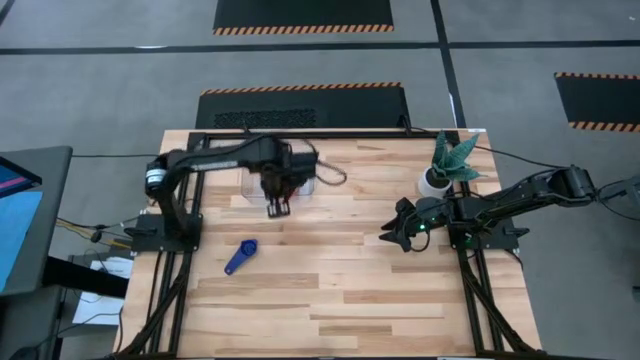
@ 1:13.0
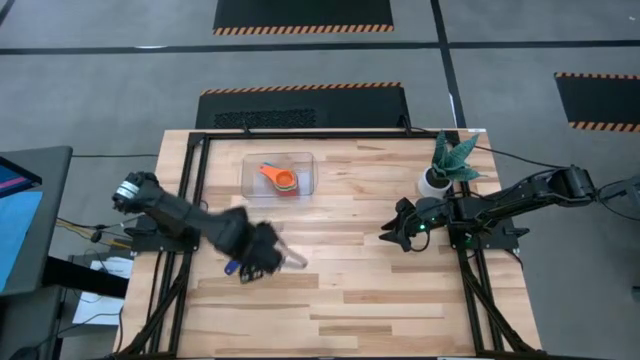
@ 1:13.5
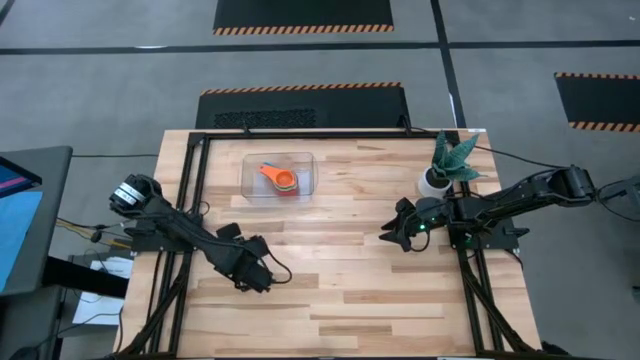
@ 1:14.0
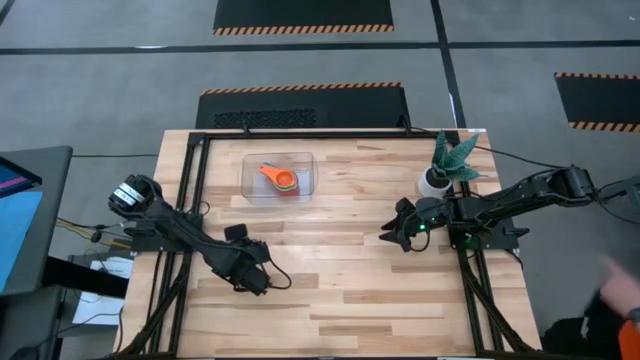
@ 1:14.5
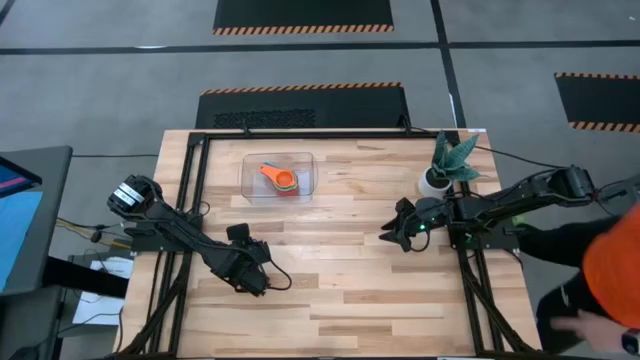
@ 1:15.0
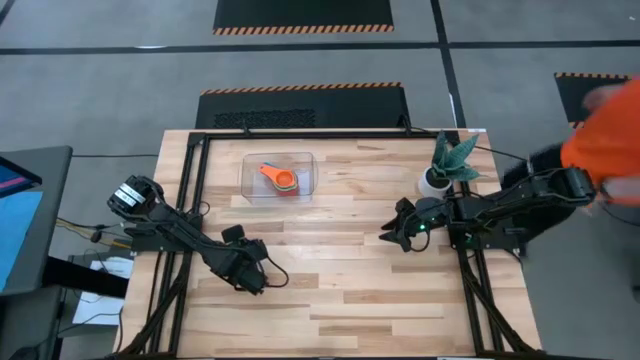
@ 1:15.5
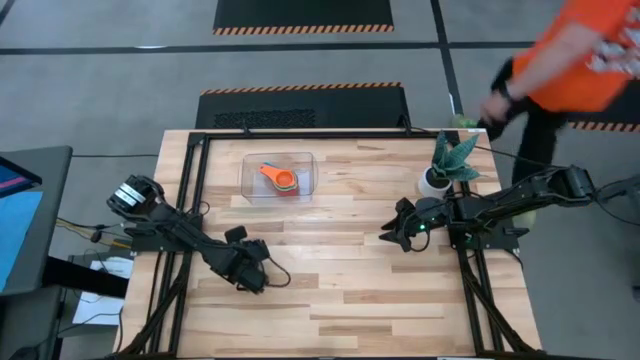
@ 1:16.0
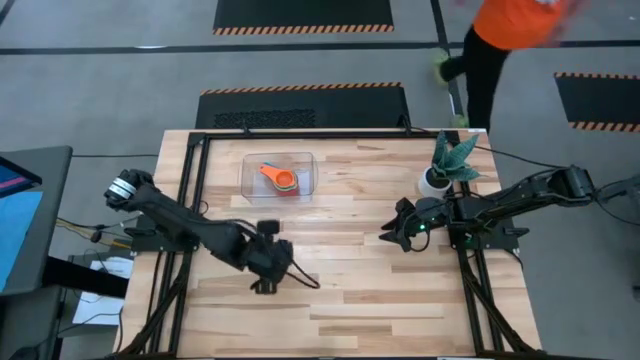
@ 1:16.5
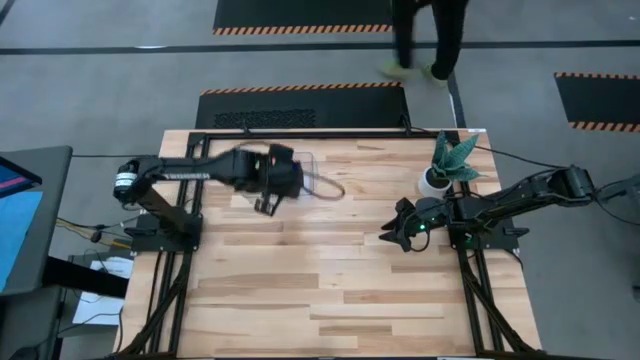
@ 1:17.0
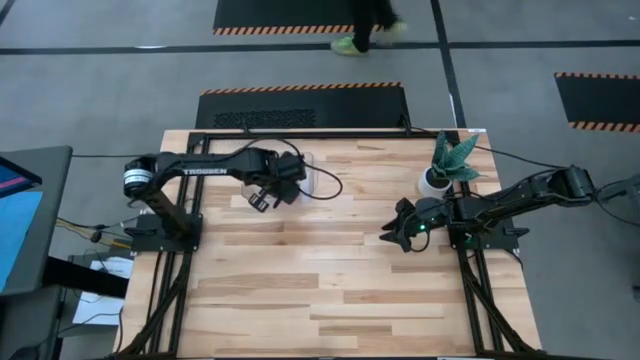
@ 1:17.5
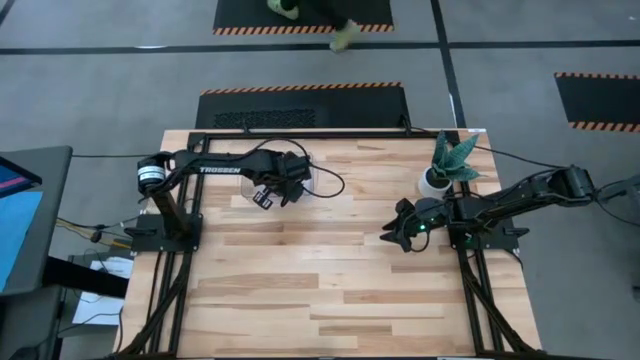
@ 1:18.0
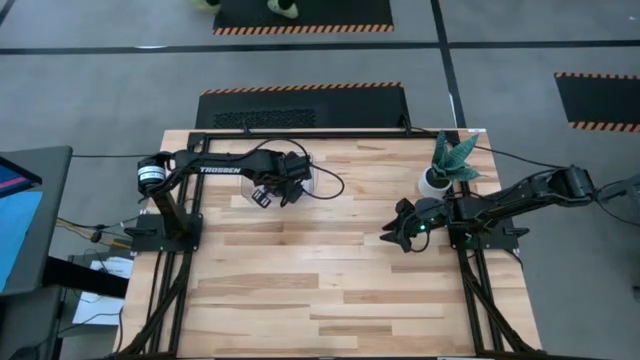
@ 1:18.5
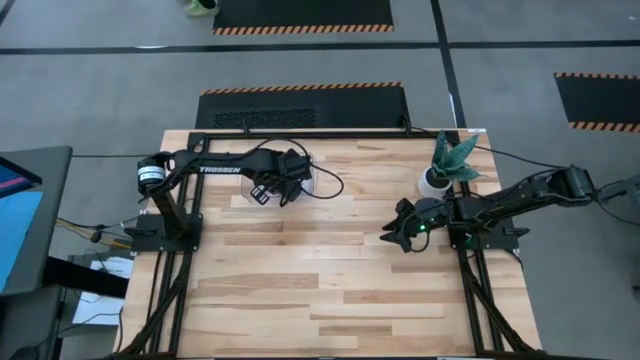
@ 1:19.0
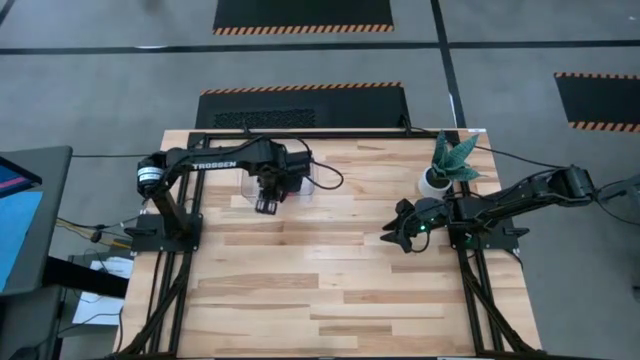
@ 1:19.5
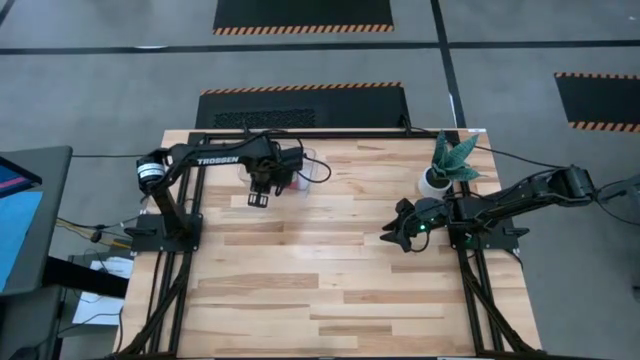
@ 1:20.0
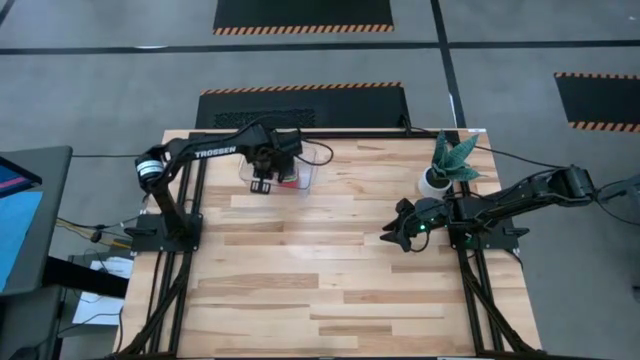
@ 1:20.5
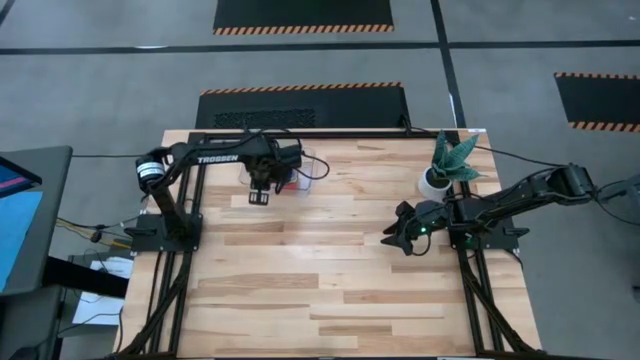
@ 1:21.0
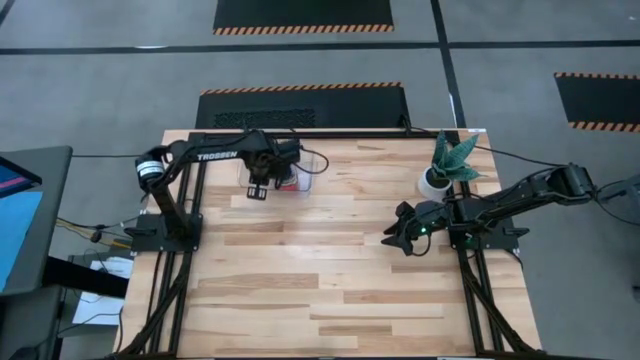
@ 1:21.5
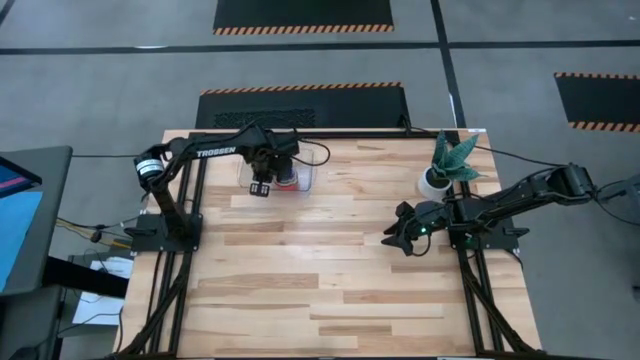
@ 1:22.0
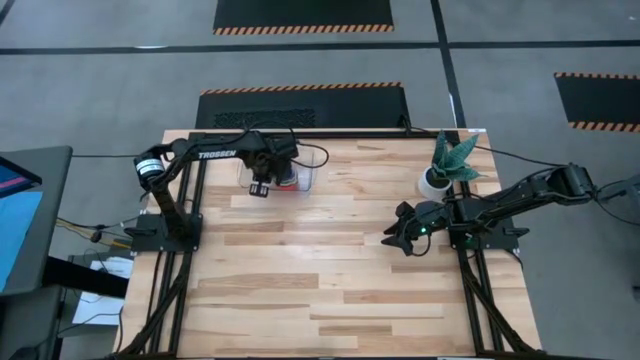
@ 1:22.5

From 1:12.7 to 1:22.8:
Task: Nest measuring cups in basket
Stack the violet measuring cup into the orange measuring cup in the transparent bin

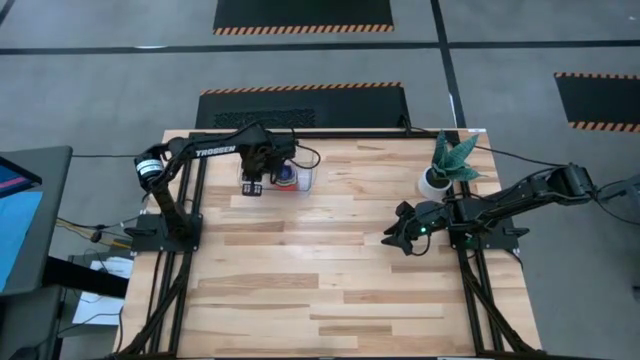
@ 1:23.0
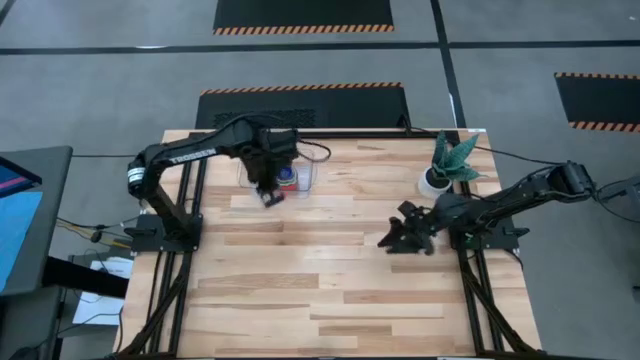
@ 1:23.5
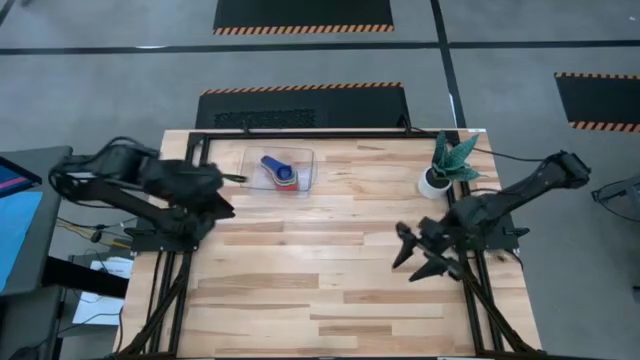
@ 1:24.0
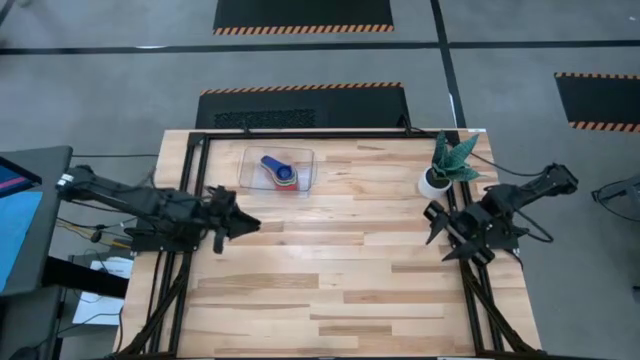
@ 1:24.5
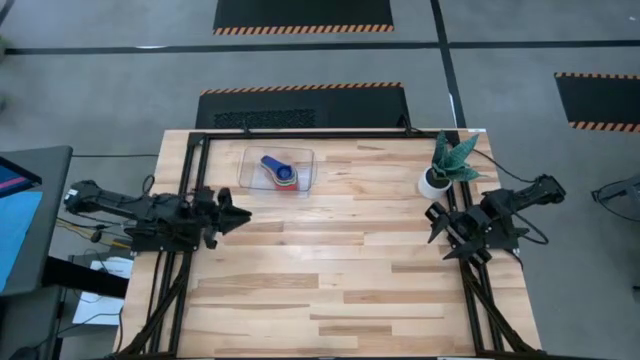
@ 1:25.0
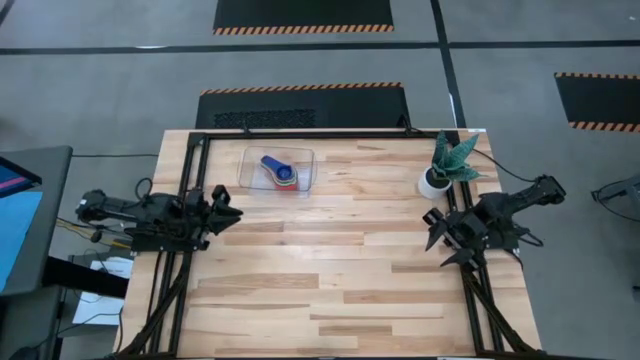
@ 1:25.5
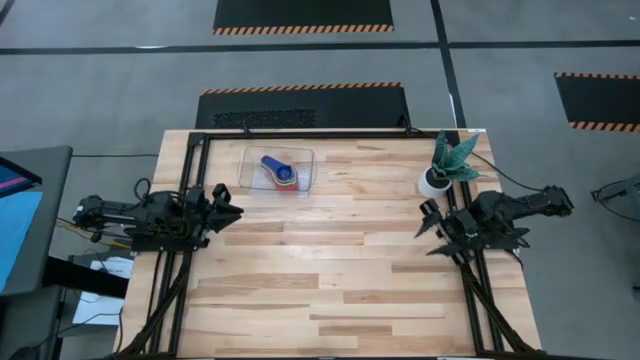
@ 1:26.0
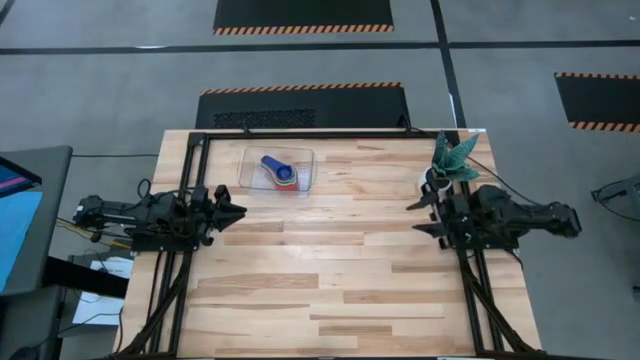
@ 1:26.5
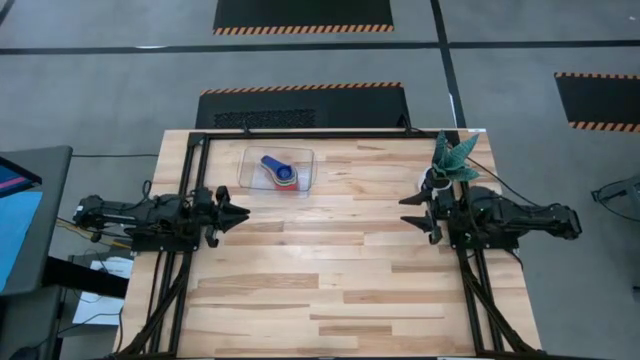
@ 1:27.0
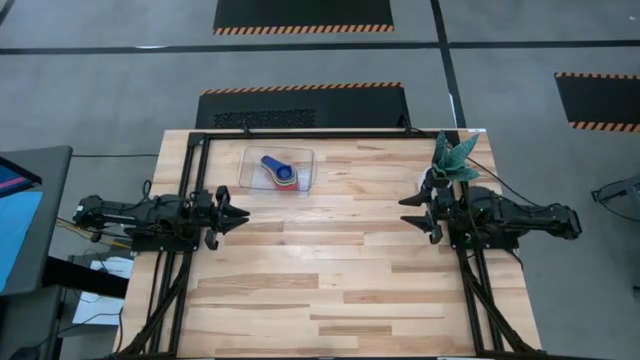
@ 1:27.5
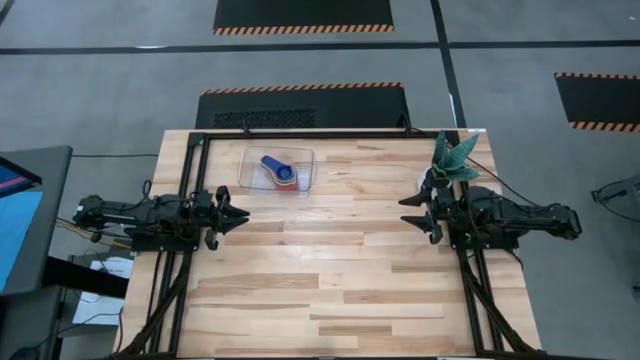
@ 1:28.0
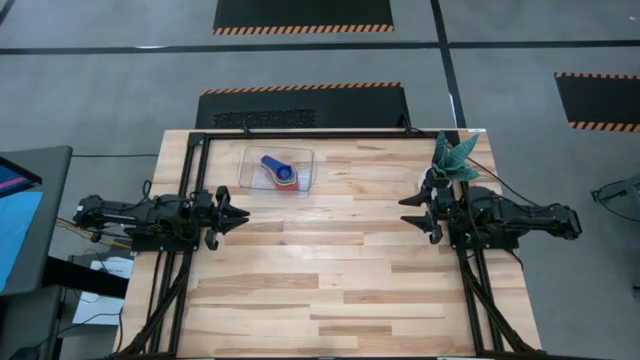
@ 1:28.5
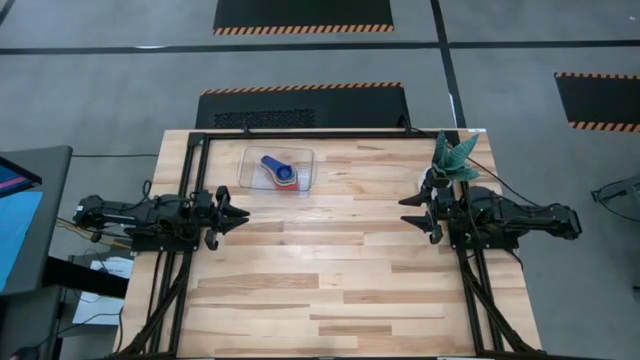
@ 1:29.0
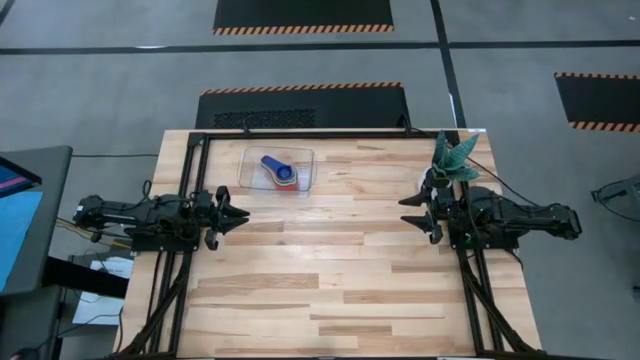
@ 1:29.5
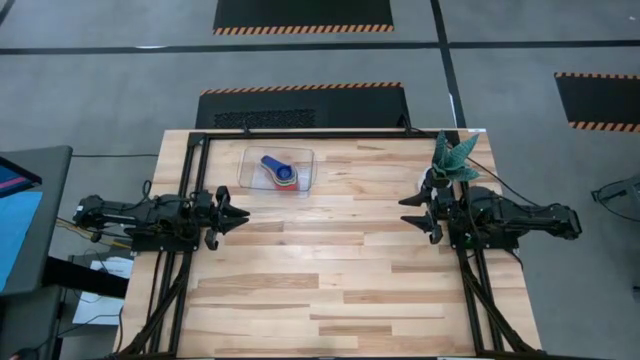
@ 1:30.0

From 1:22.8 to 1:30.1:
Return to Home Position

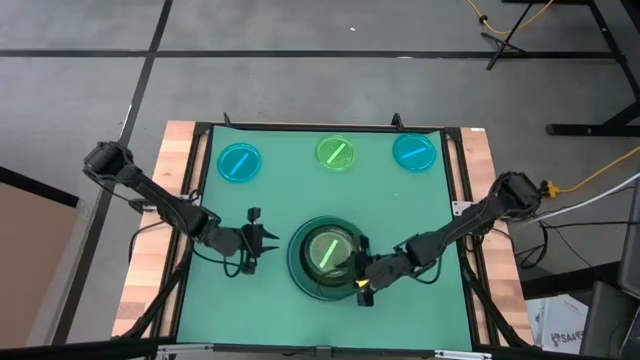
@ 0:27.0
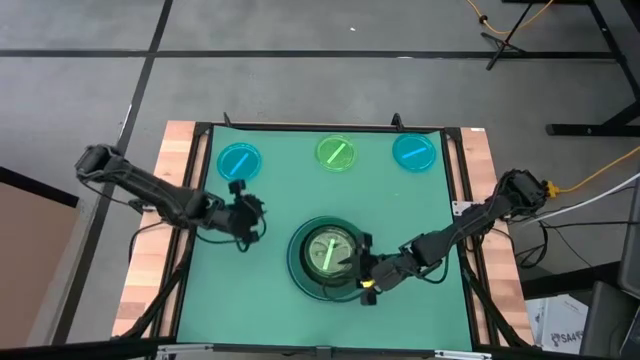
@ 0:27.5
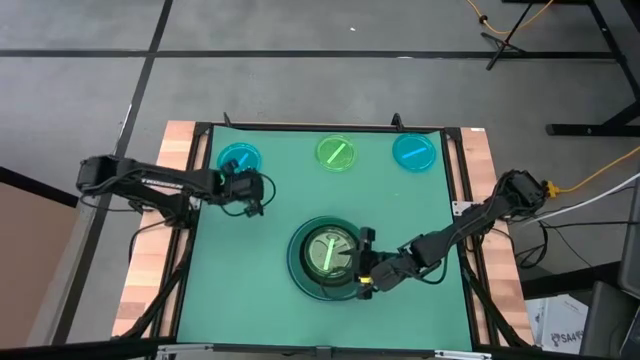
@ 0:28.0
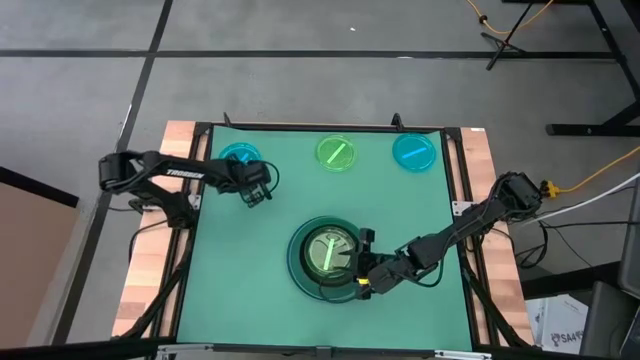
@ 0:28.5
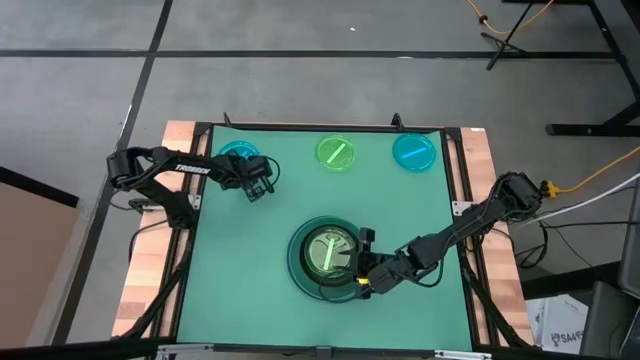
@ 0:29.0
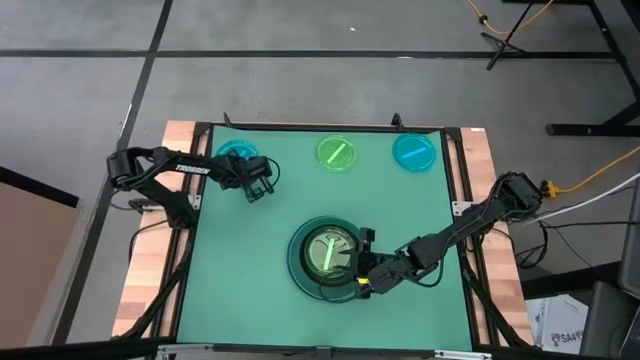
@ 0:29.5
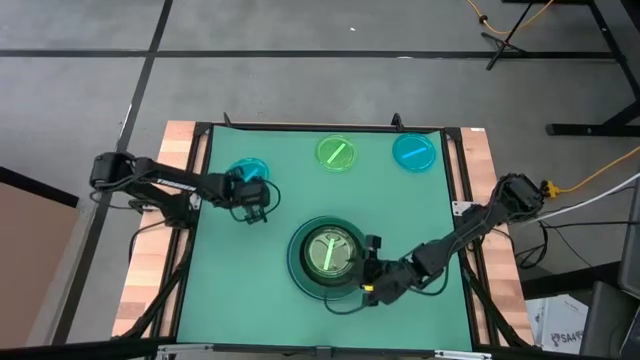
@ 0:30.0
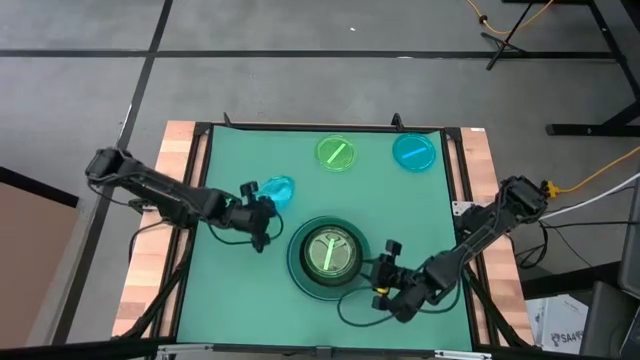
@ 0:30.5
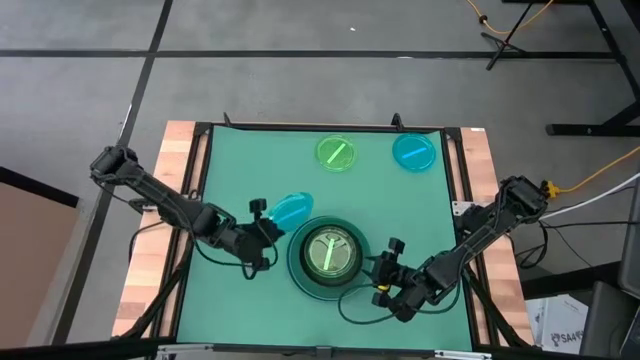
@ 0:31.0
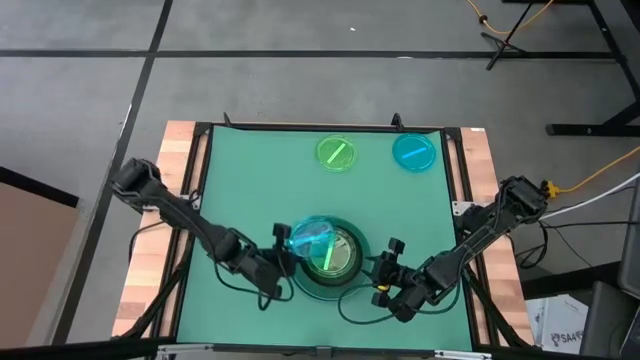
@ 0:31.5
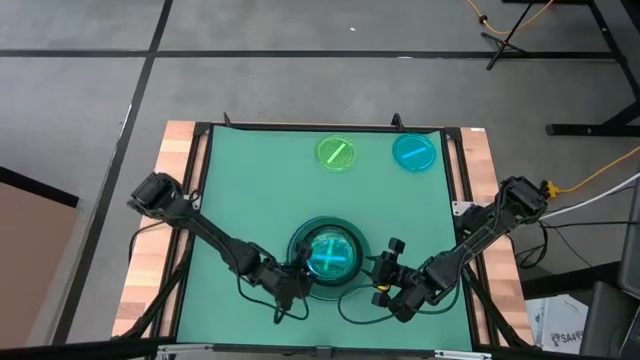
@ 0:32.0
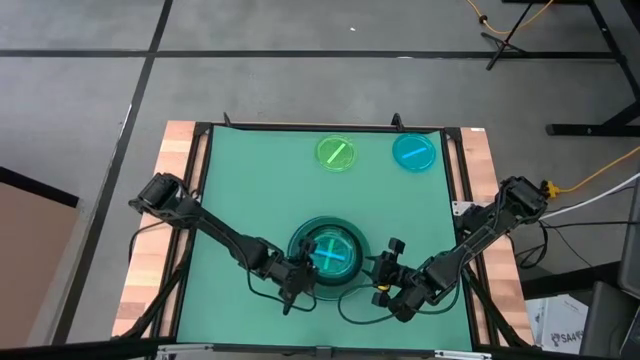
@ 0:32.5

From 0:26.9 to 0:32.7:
Task: Stack plastic plates
Stack the left blue plate on the green plate
